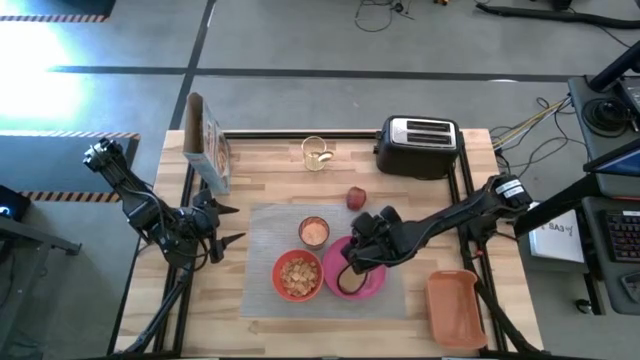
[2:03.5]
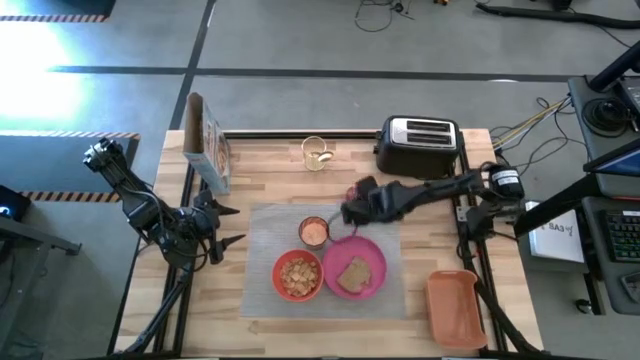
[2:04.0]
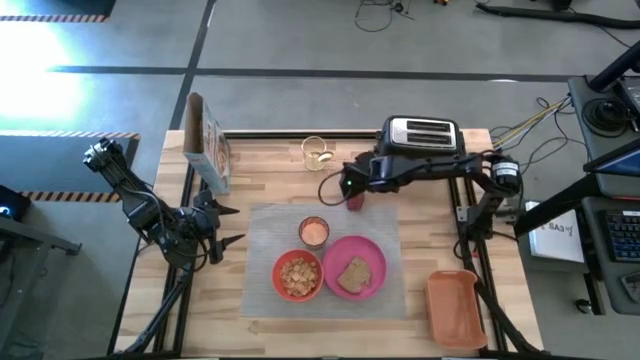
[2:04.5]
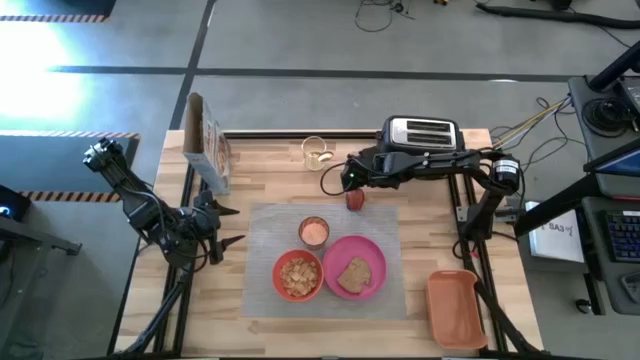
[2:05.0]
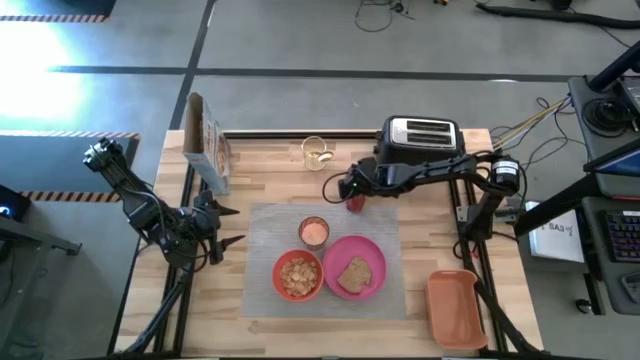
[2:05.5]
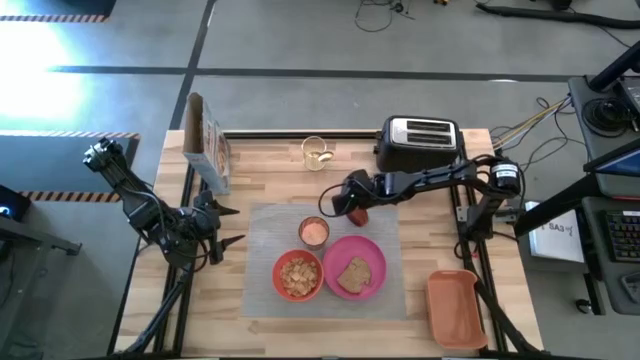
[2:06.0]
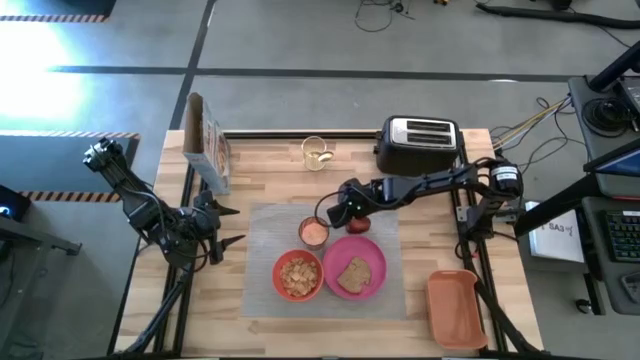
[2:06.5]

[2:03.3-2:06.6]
Task: Arrange a breakfast setting
Put the red apple to the top of the pink plate on the gray mat

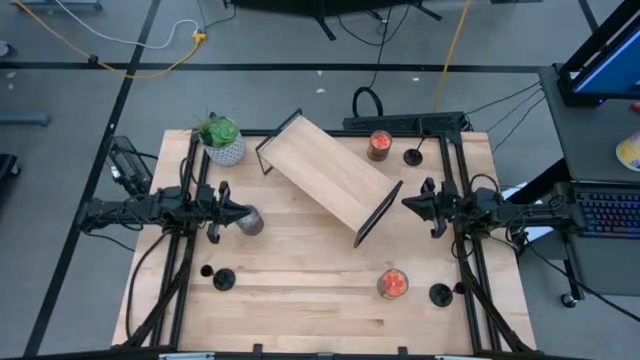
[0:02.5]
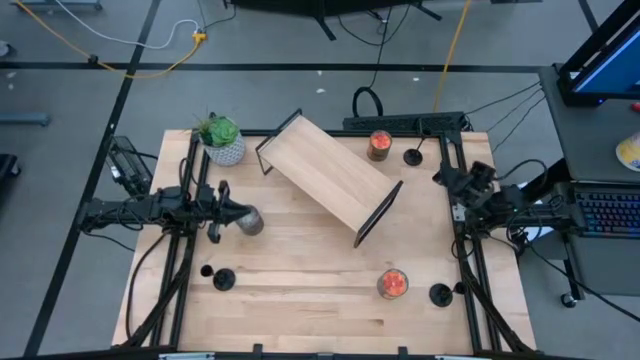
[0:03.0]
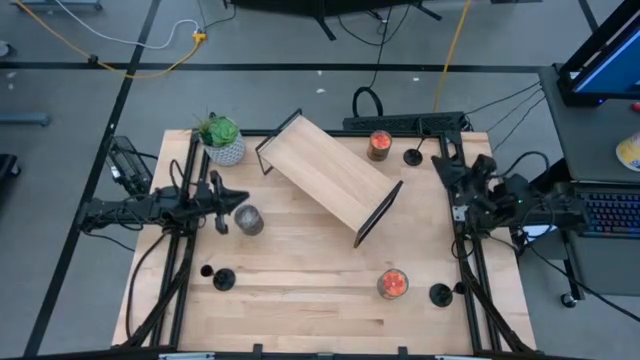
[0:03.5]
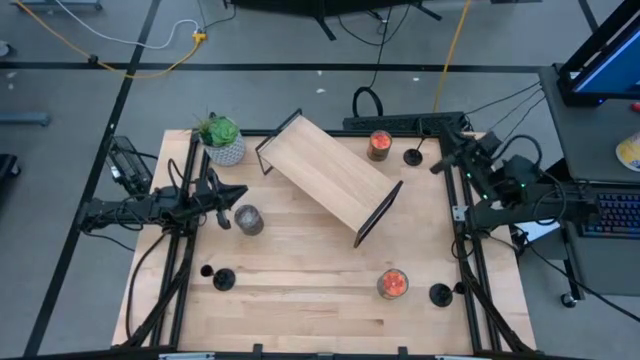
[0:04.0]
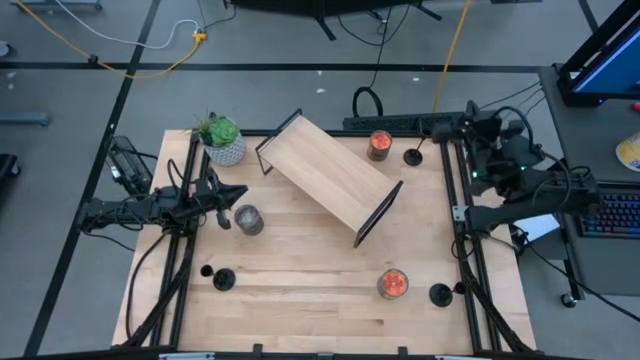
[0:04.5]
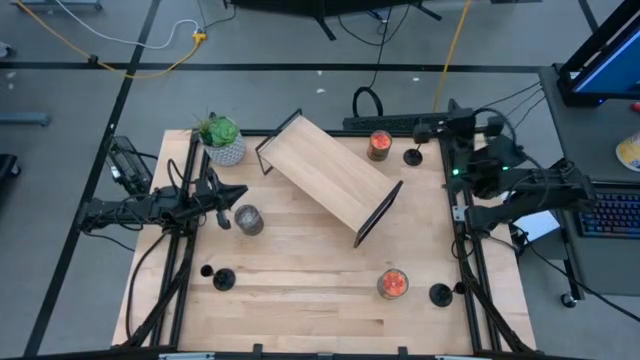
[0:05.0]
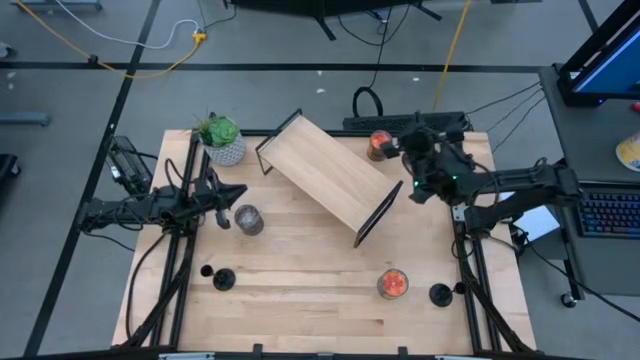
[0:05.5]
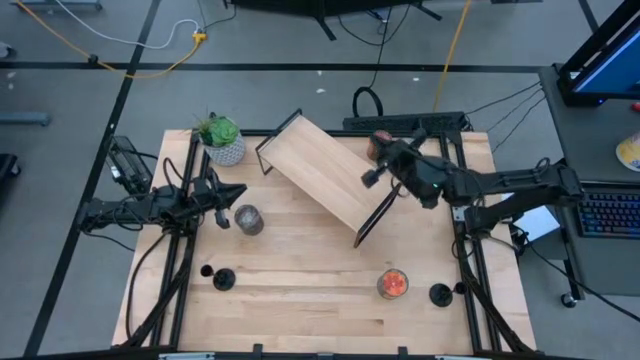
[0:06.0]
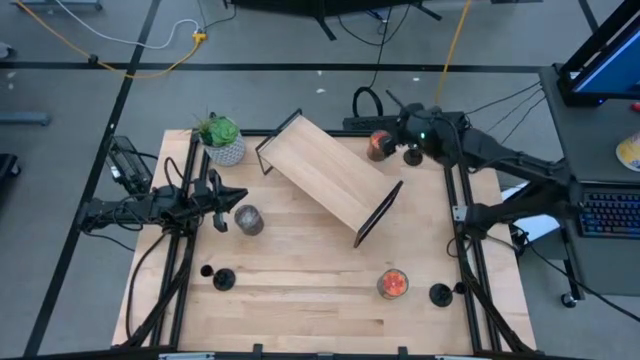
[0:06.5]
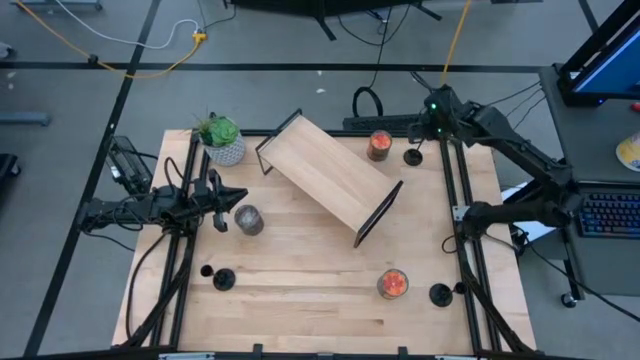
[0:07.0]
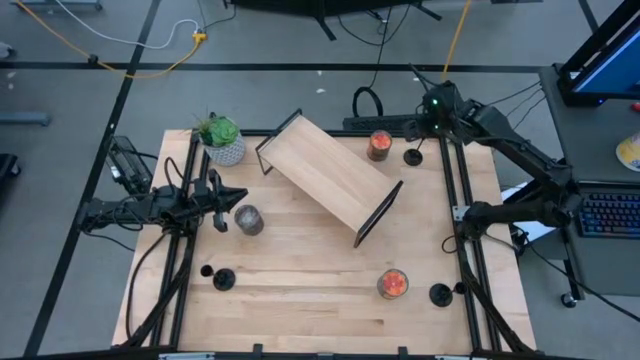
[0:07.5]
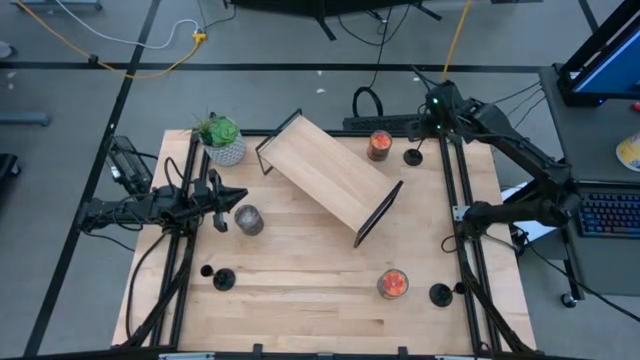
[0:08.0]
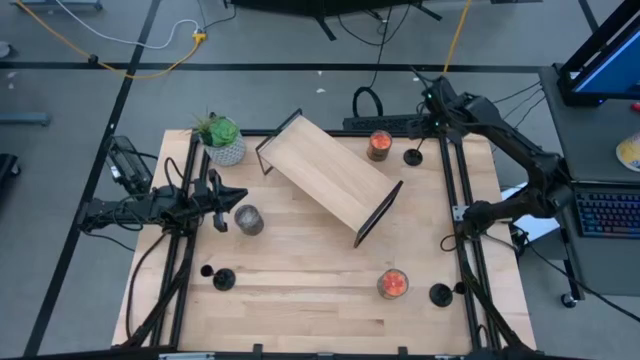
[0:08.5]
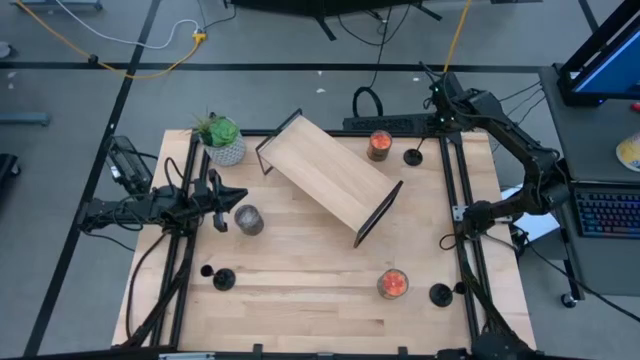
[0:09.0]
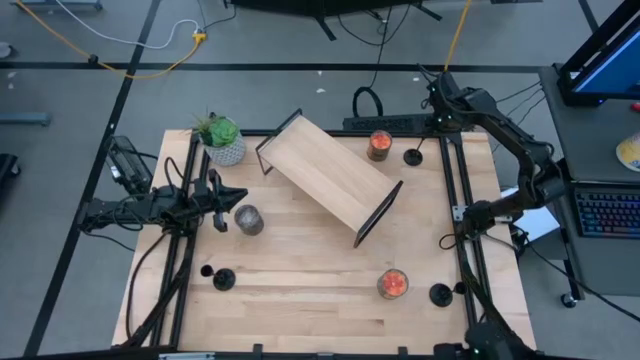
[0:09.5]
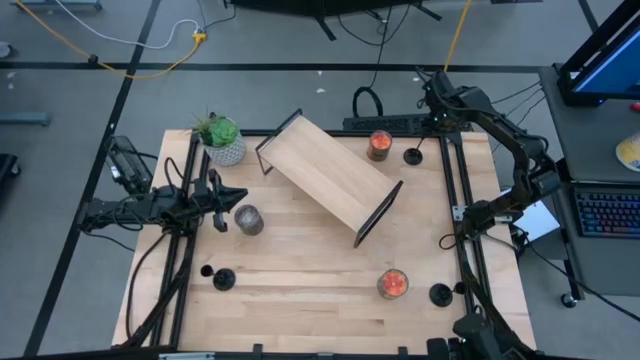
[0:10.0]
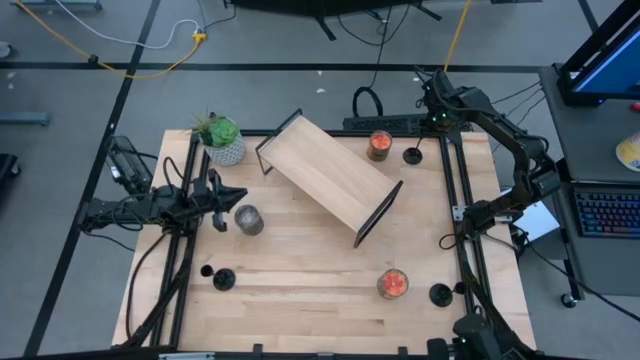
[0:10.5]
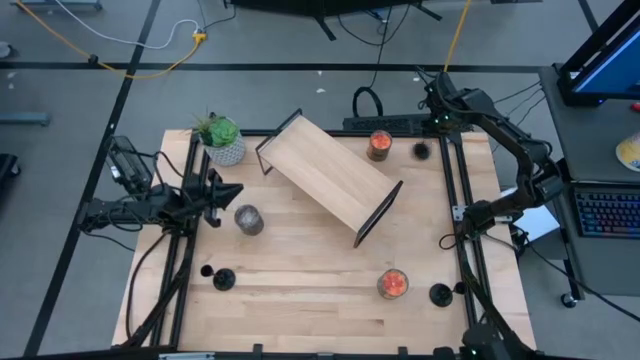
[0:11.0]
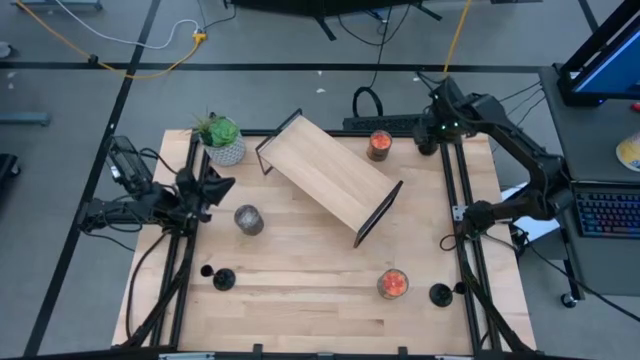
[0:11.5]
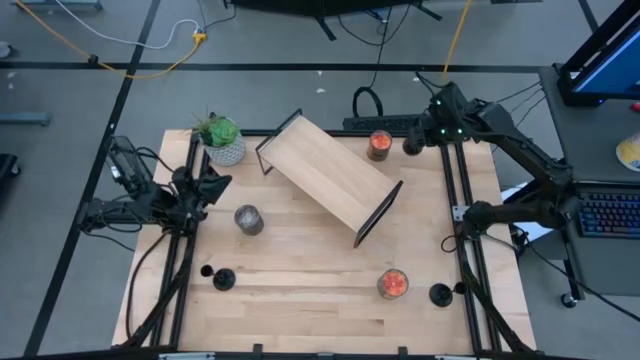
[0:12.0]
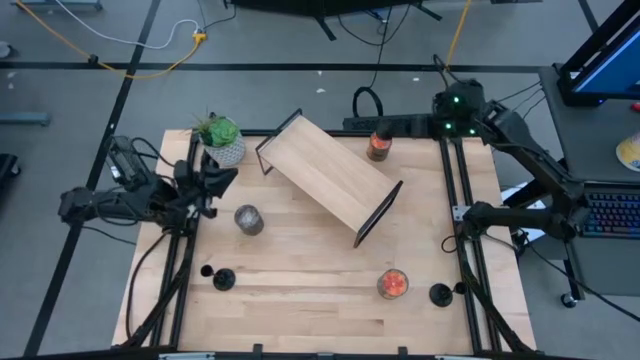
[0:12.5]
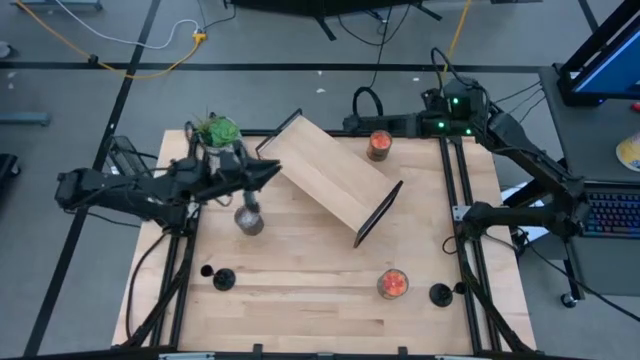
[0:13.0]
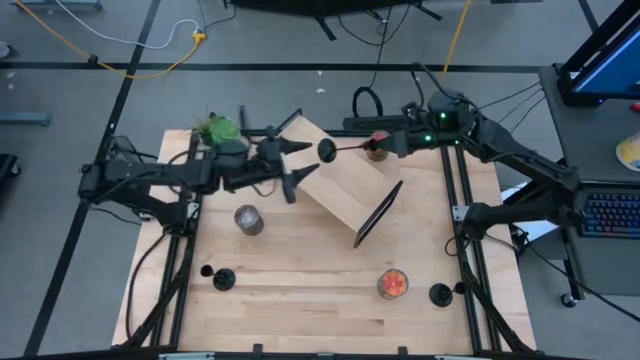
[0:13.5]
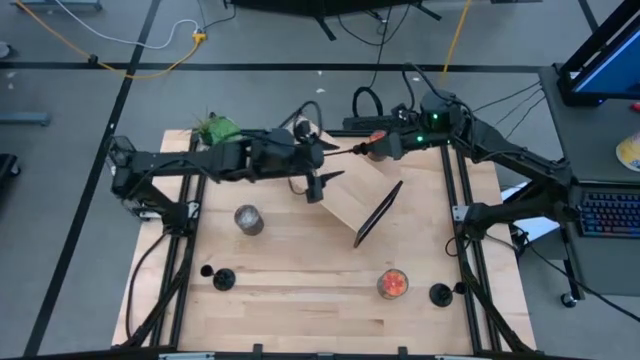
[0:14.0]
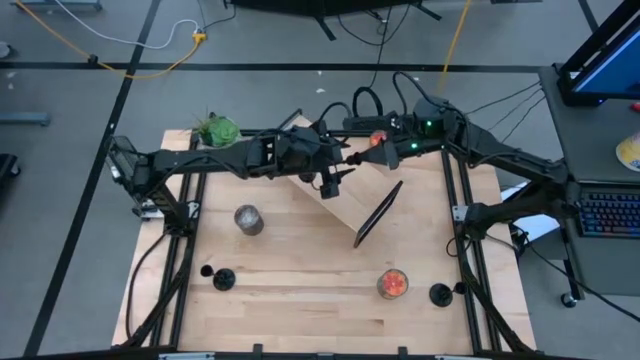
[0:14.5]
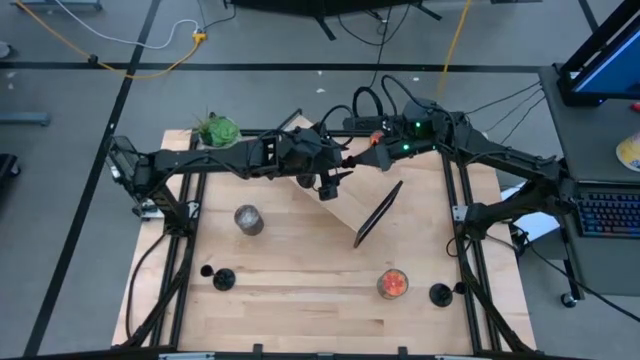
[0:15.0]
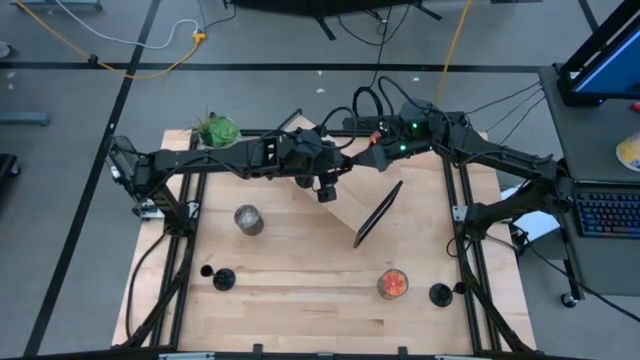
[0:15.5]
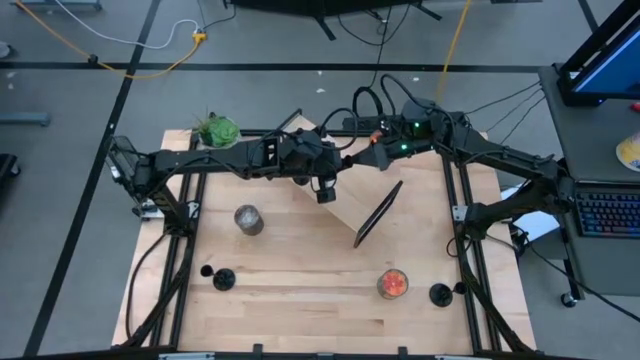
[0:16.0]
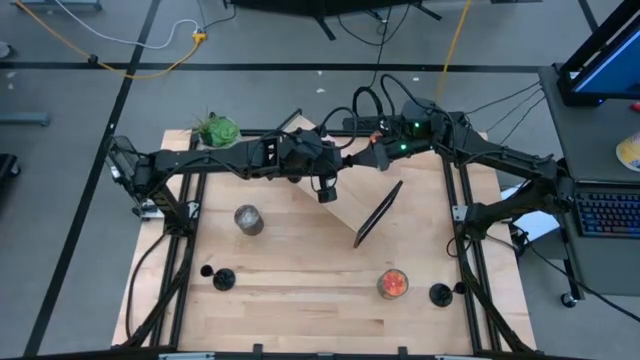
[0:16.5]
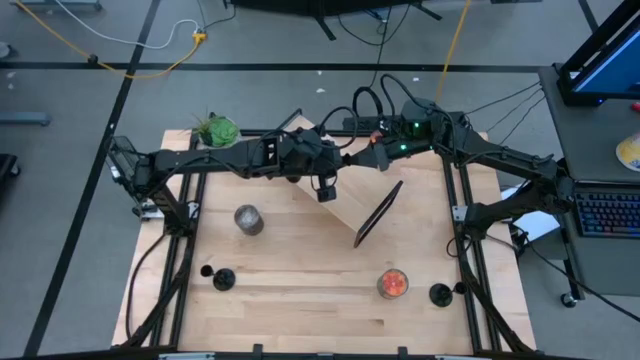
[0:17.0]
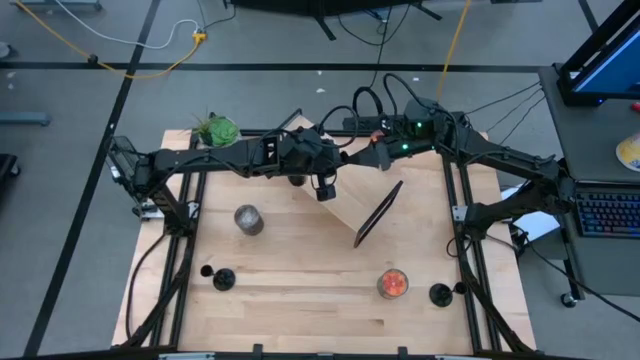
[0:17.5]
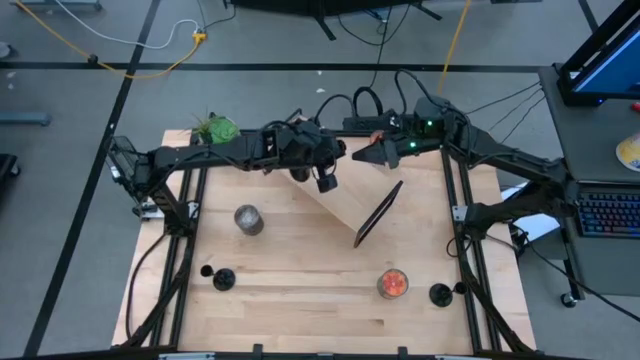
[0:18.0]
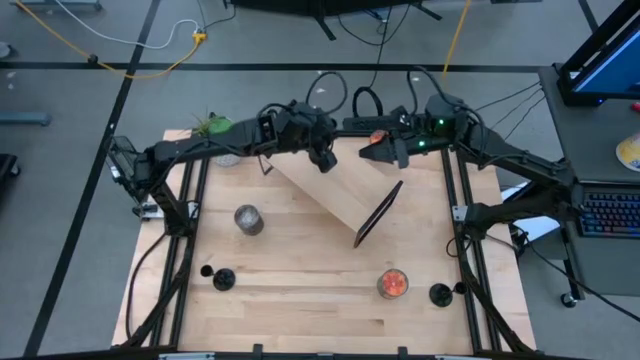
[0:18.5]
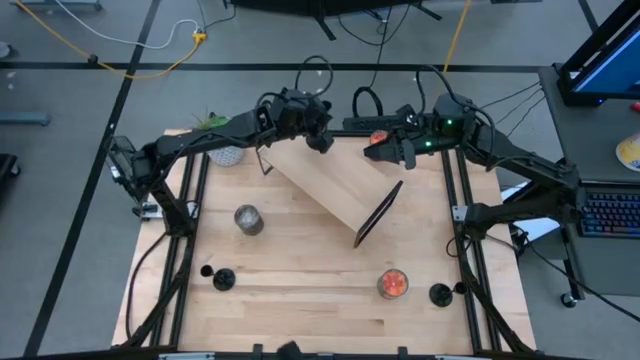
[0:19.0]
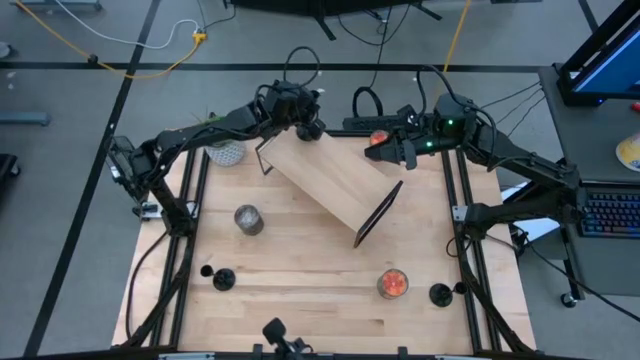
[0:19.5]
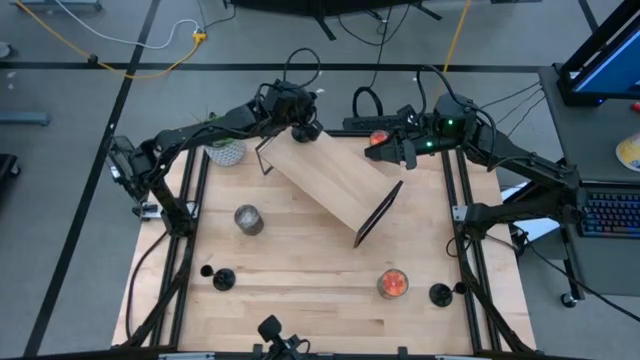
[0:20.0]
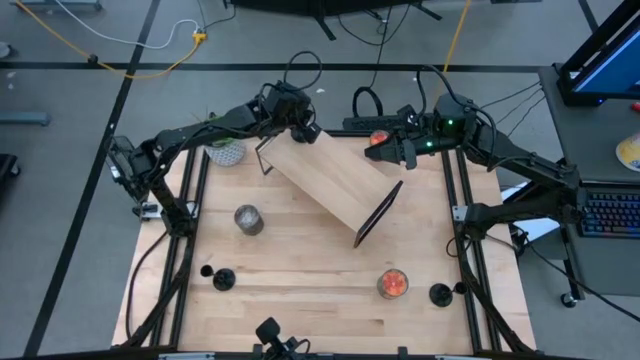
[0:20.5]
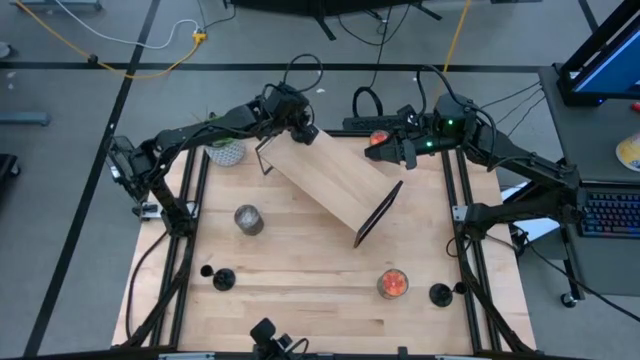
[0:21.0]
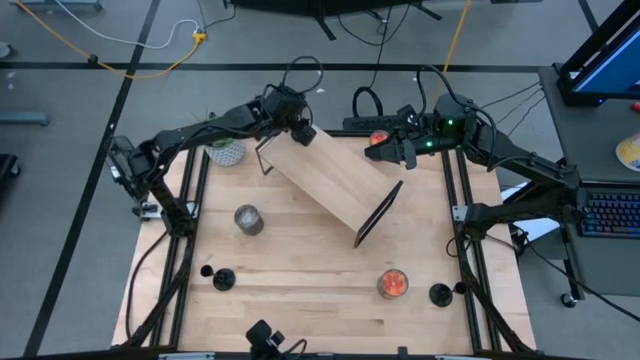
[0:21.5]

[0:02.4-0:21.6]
Task: Pick & Place candle stick holders
Put the top right candle holder on the shelf
